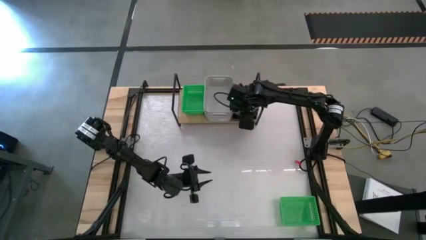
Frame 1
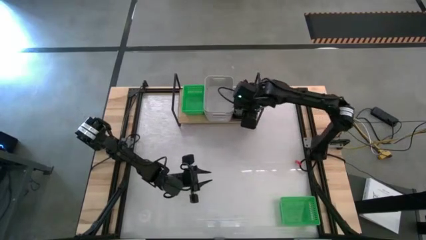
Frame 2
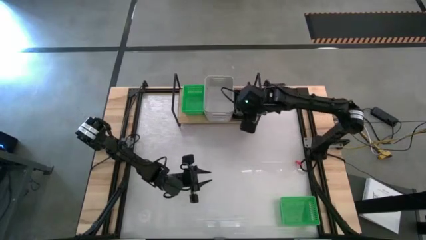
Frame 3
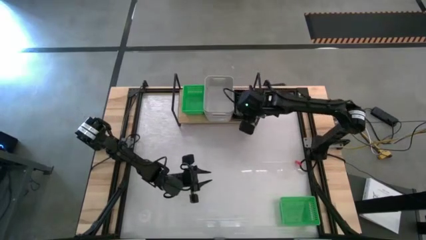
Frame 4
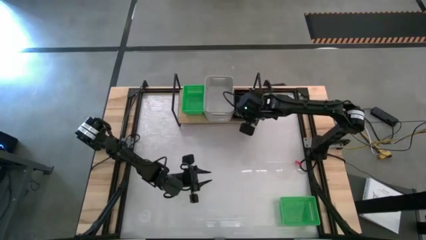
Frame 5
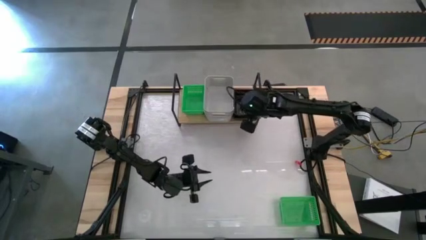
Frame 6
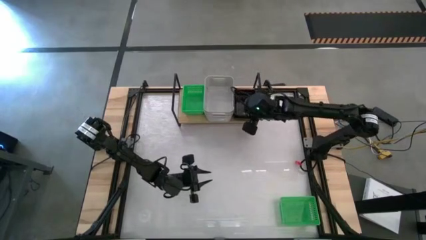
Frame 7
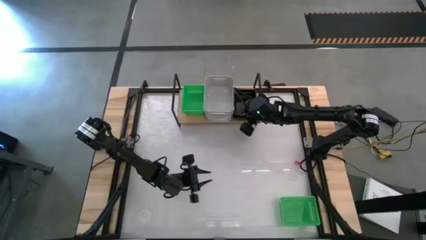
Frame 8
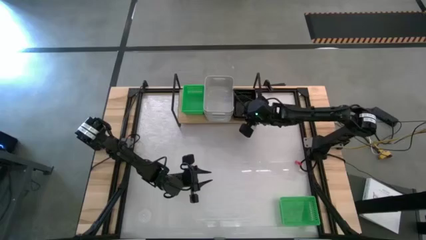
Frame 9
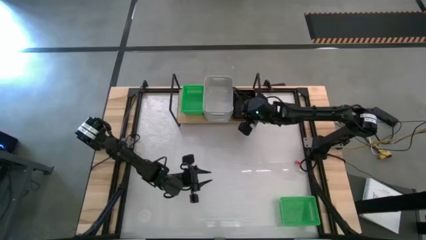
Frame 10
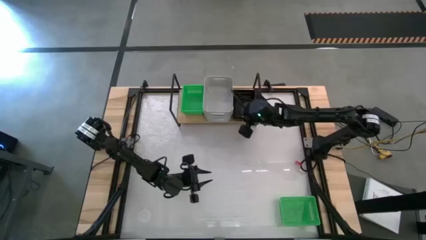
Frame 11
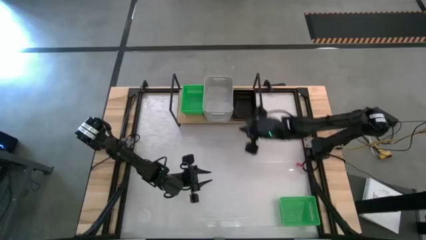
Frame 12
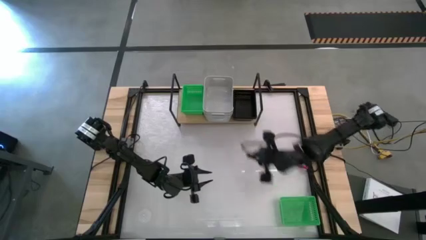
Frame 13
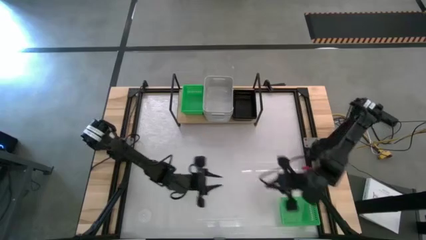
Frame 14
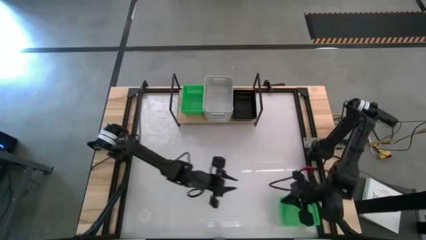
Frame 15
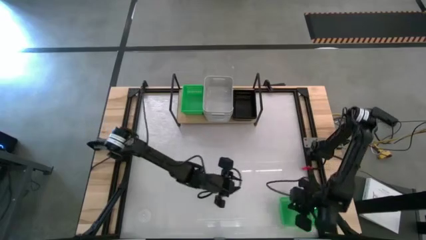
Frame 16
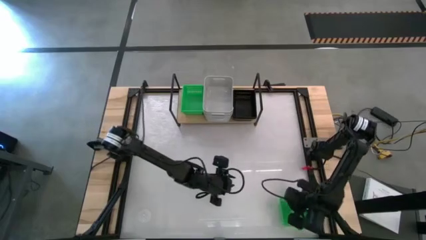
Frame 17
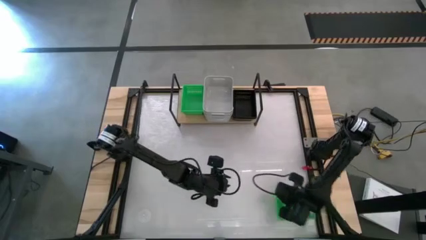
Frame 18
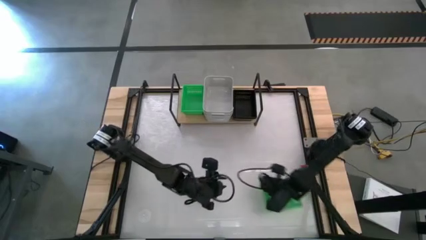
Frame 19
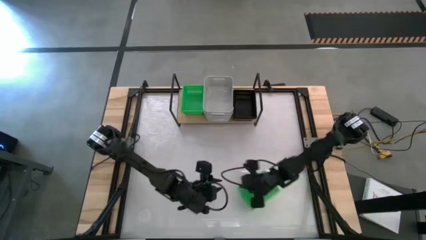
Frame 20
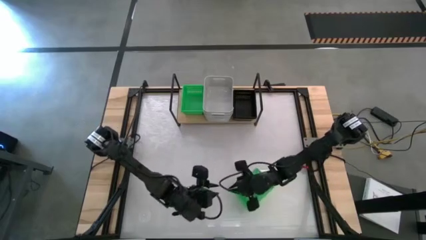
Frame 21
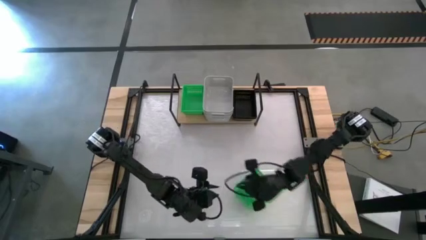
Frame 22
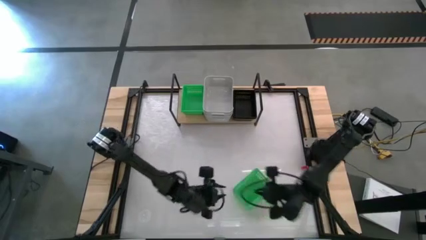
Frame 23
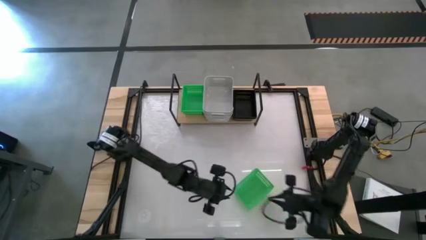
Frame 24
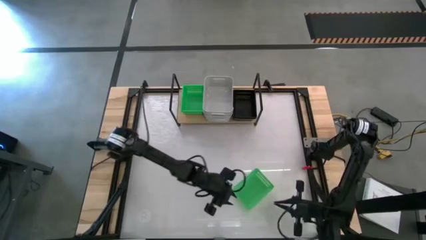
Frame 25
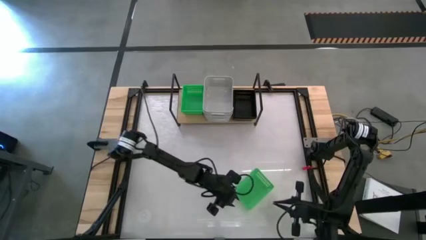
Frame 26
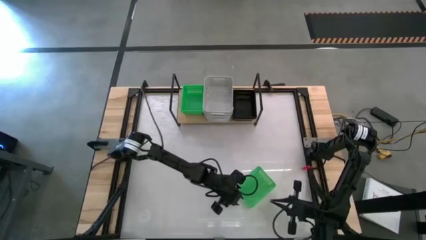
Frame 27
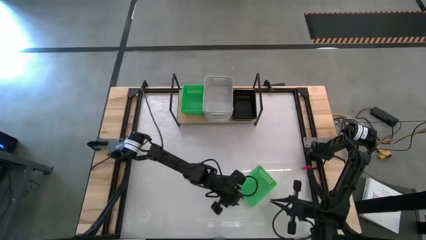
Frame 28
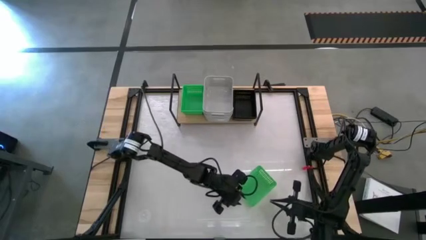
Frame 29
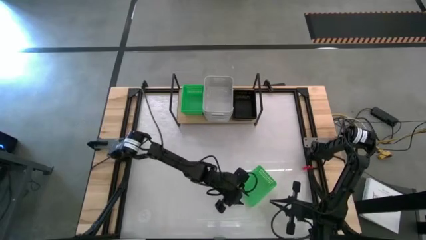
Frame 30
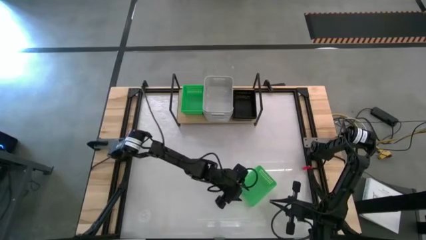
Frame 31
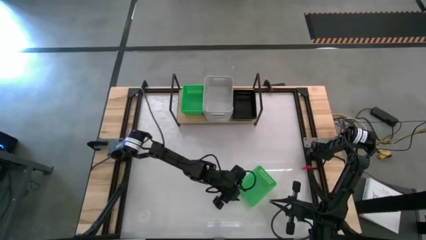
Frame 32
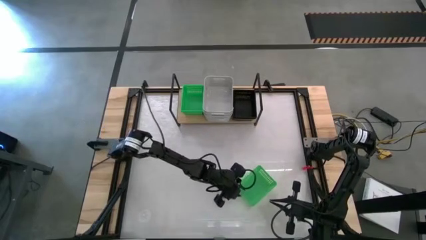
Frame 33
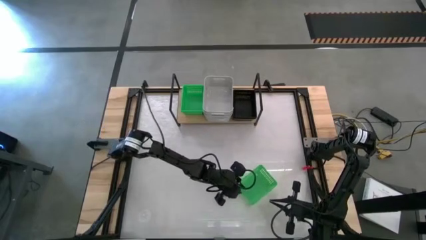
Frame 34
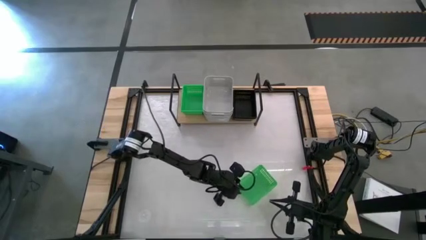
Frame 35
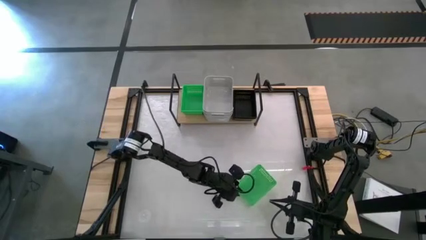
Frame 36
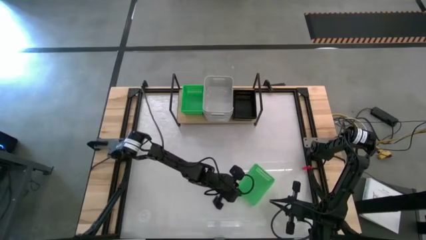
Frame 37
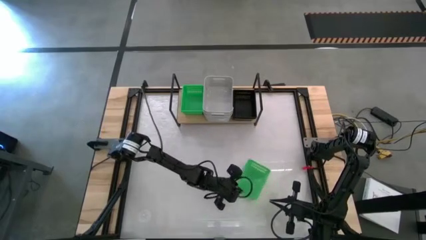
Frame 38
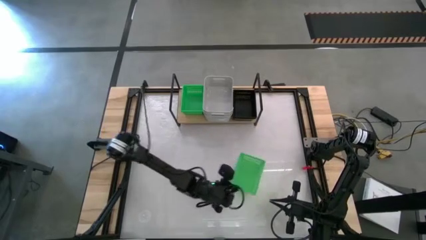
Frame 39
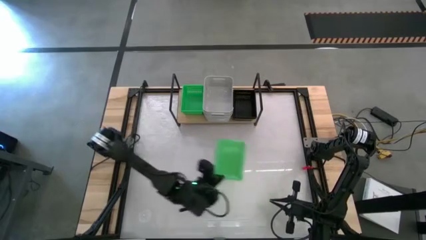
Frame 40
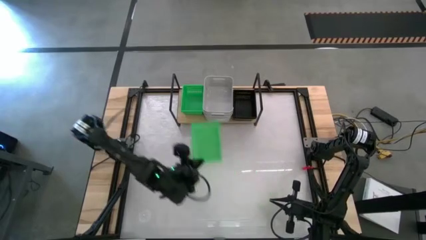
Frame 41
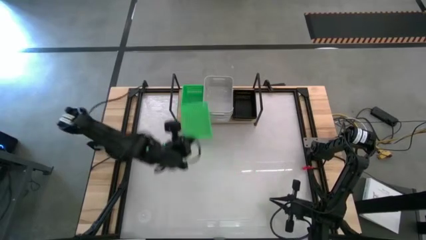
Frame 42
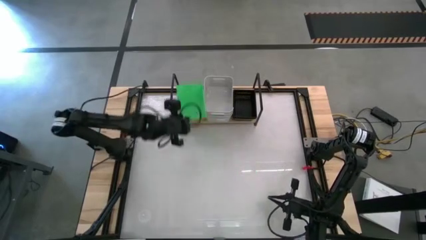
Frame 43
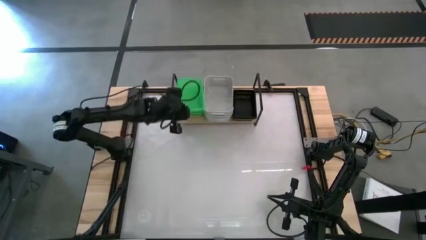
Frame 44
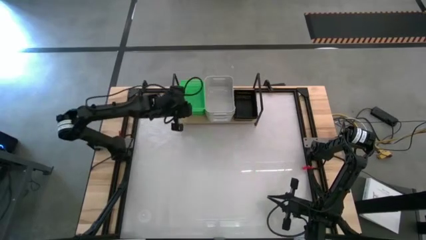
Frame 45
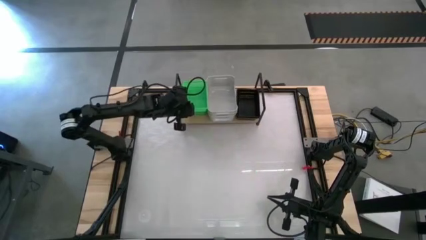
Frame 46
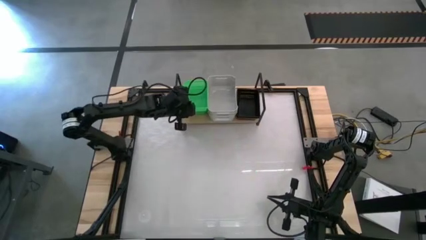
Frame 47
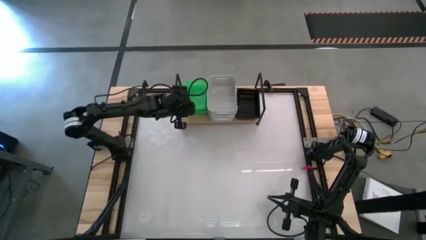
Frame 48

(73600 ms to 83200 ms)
Task: Stack baskets on shelf by color
Stack the green bin on the stacked green bins on the shelf

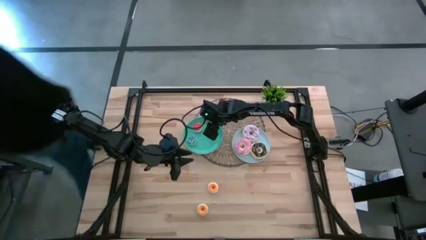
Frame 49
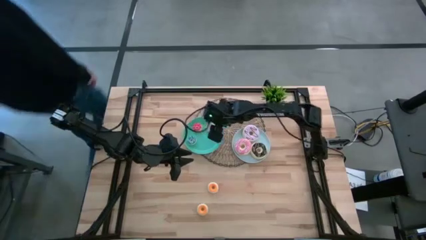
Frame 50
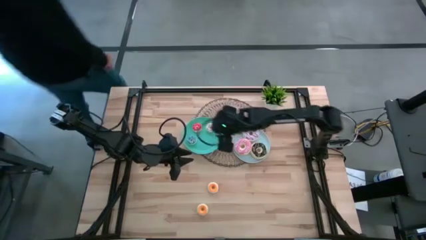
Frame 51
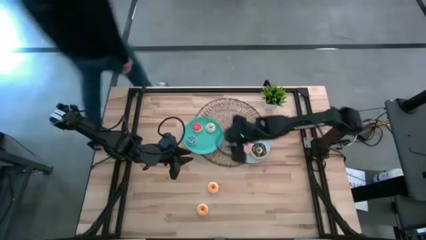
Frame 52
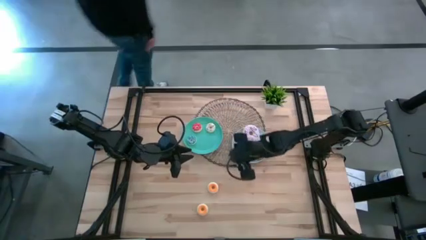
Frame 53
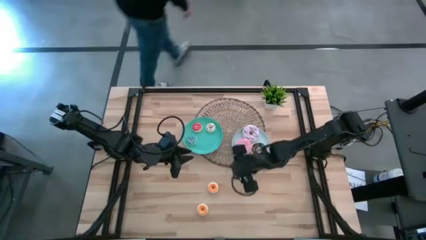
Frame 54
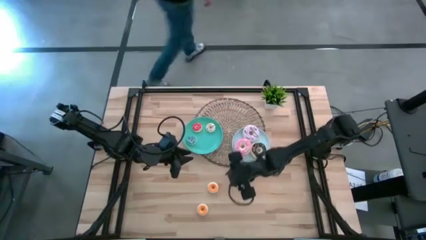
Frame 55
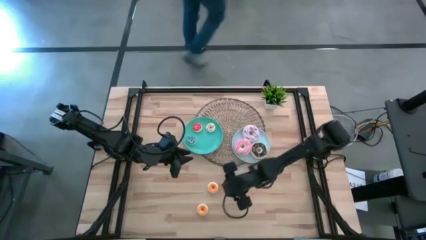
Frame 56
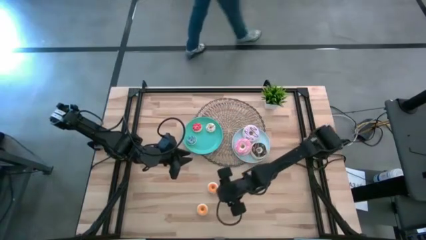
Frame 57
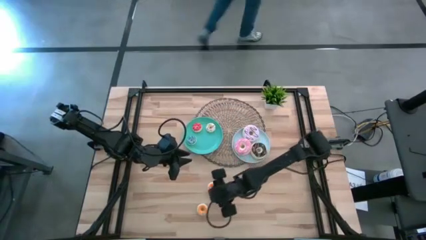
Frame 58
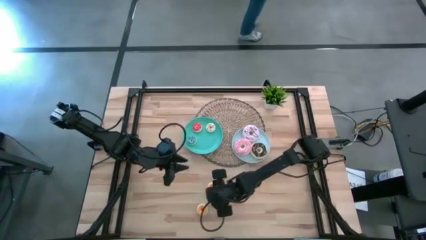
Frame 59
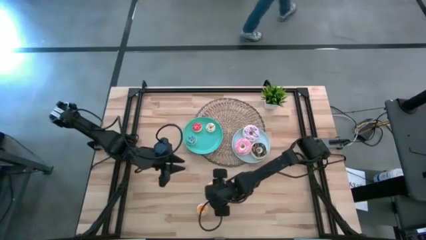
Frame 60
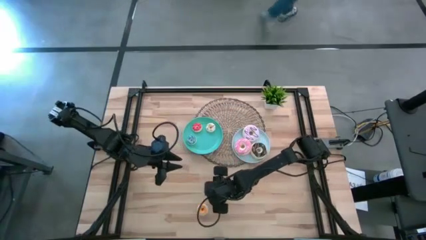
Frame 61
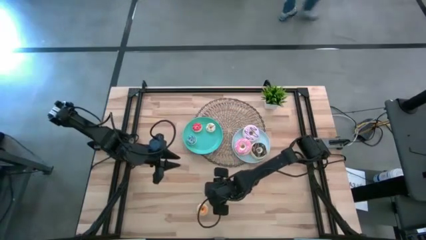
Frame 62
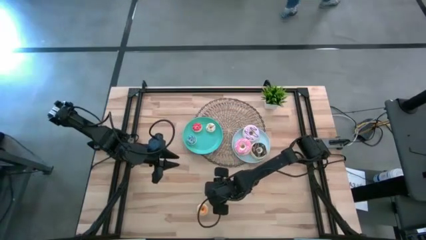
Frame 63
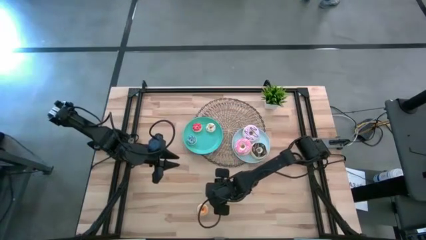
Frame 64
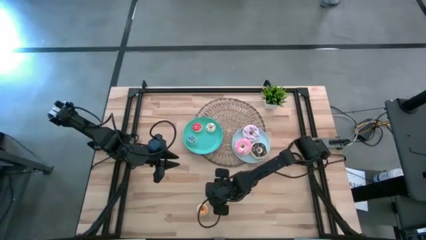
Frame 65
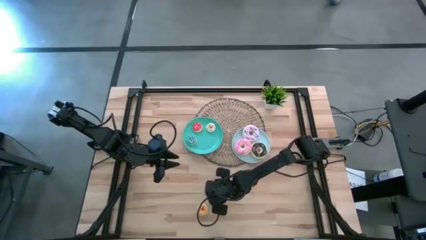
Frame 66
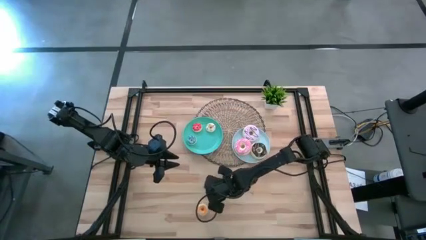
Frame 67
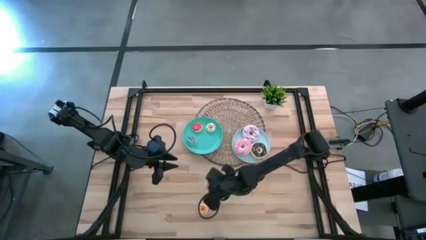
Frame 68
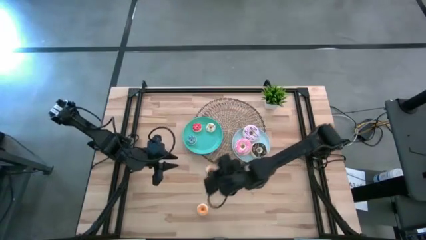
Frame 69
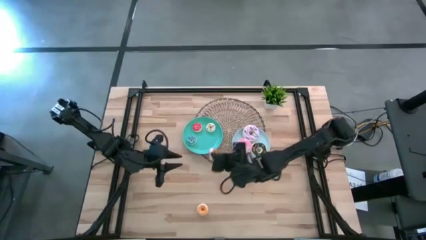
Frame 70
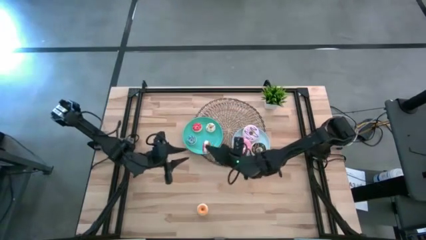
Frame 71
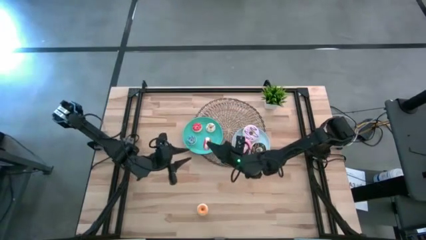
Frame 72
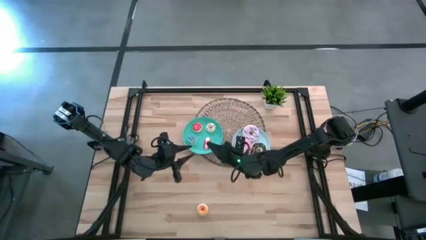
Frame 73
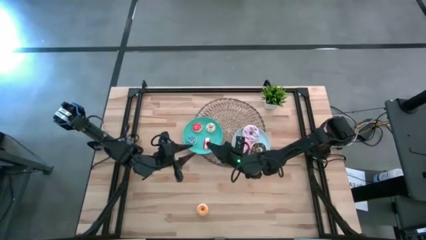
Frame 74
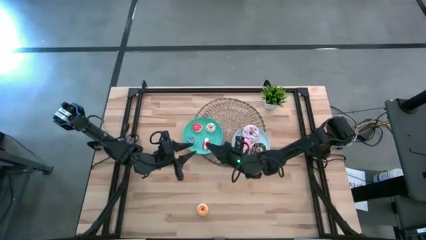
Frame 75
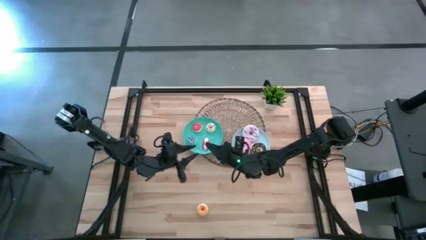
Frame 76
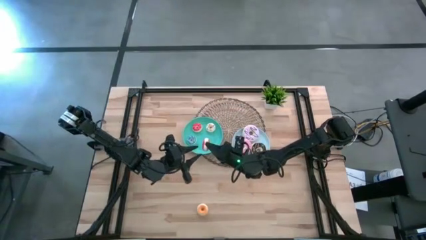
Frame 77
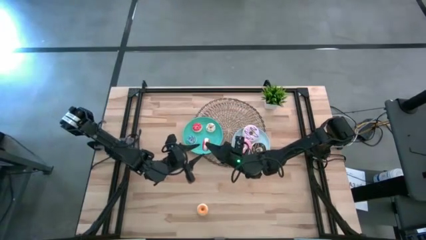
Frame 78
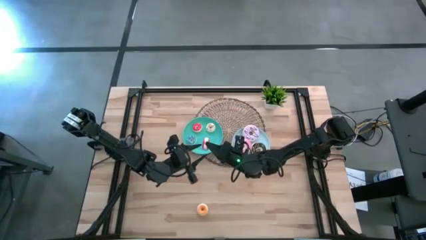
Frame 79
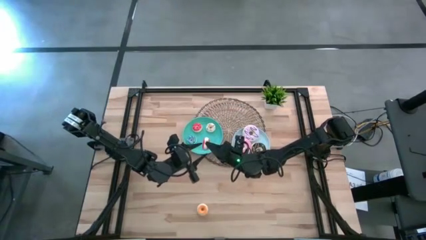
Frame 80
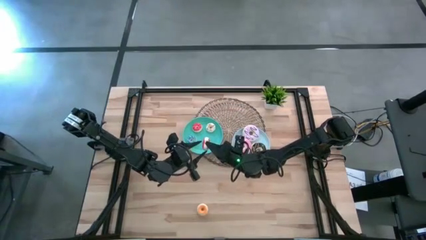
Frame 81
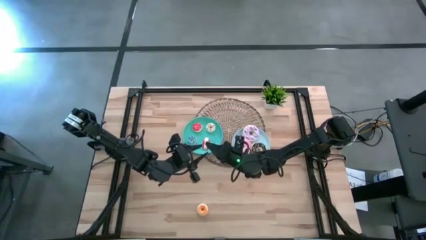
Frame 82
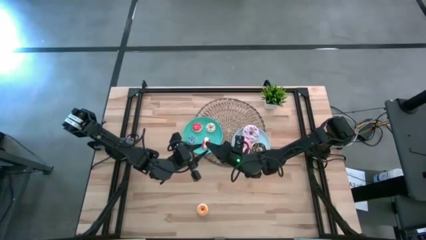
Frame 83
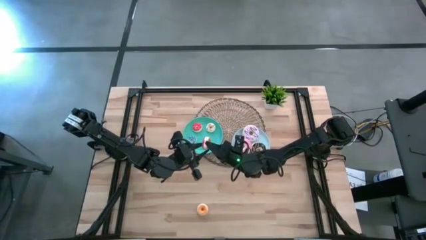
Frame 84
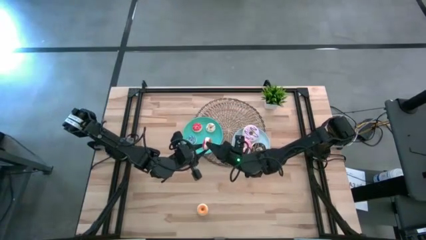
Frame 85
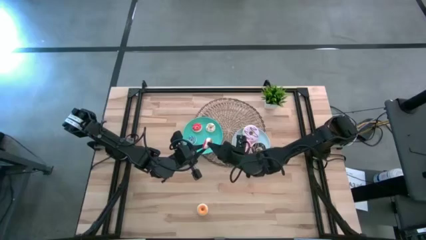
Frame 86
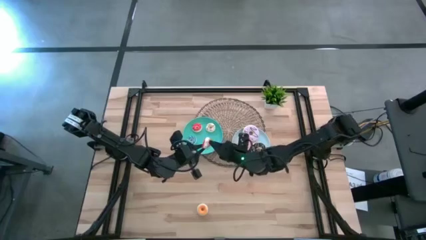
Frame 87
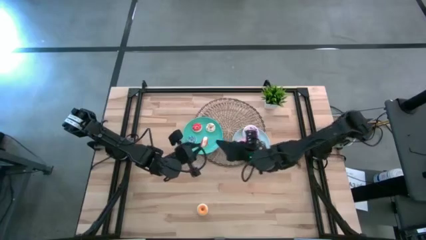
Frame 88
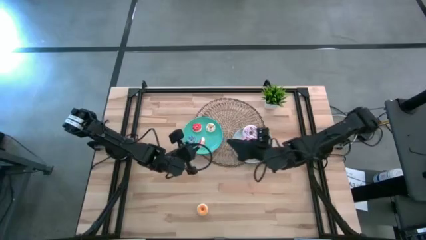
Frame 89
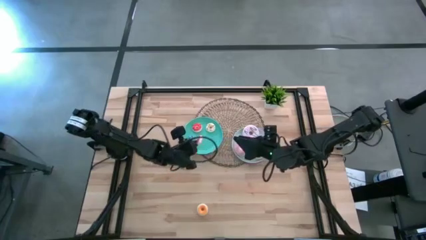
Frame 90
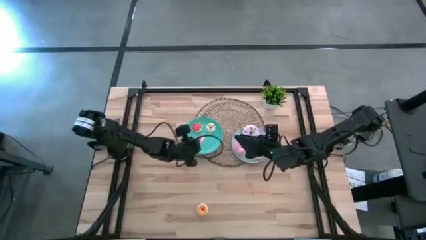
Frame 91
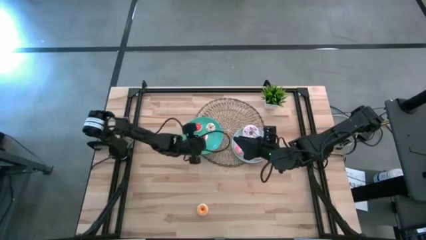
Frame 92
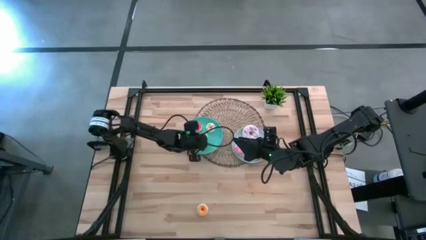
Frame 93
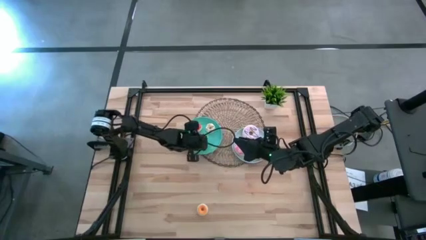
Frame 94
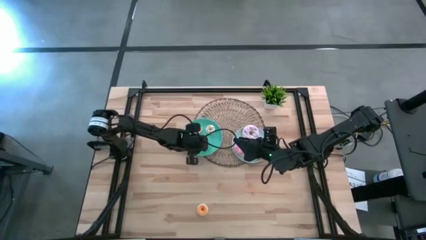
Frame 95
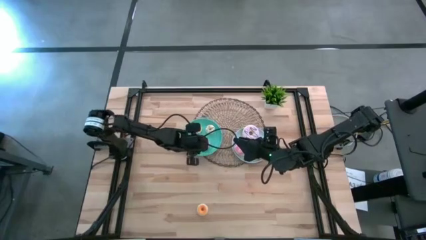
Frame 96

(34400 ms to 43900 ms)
Task: Pick & Place donuts
Put the small red donut on the green plate
